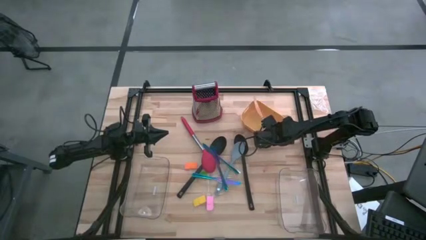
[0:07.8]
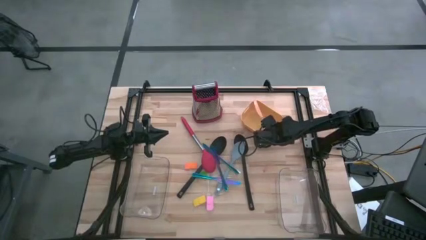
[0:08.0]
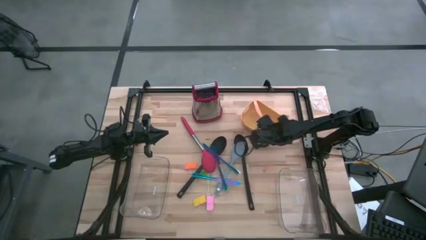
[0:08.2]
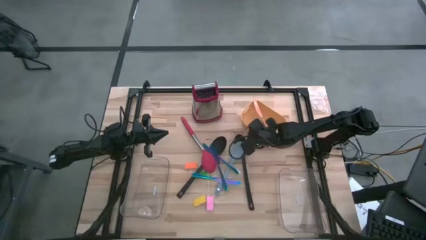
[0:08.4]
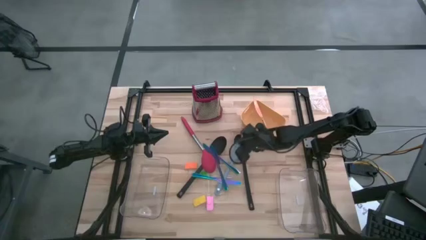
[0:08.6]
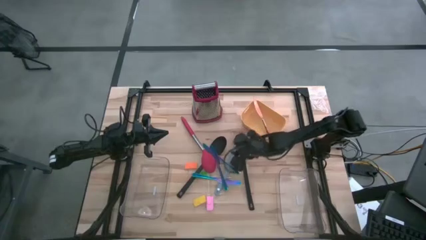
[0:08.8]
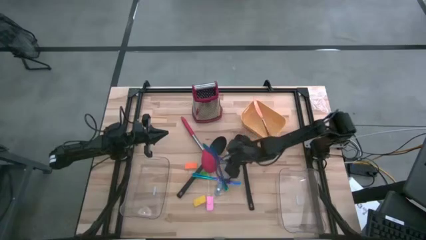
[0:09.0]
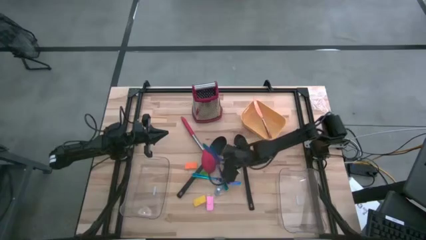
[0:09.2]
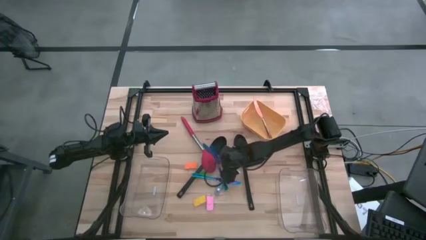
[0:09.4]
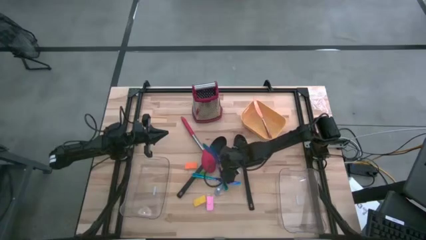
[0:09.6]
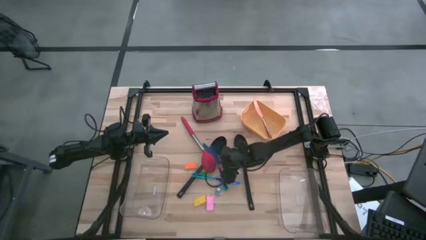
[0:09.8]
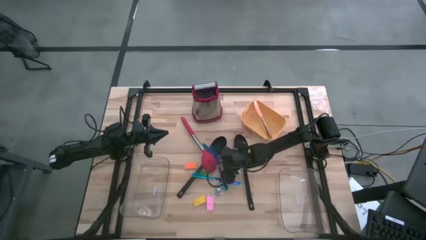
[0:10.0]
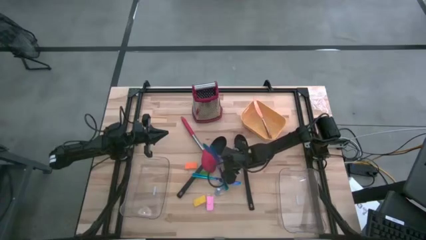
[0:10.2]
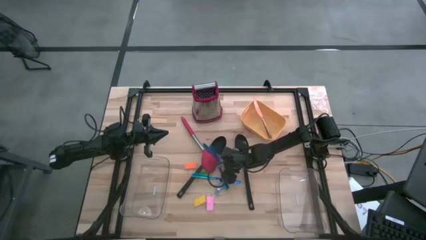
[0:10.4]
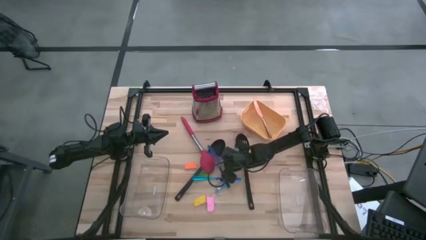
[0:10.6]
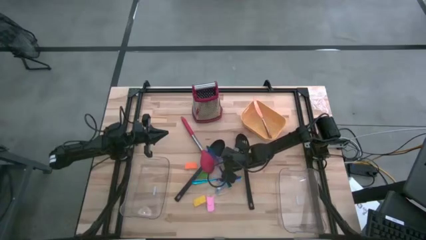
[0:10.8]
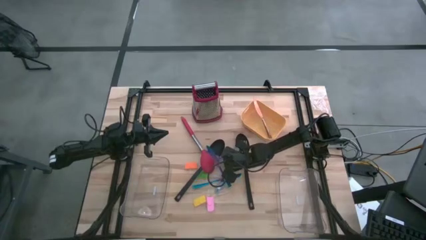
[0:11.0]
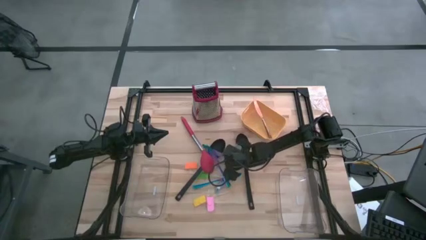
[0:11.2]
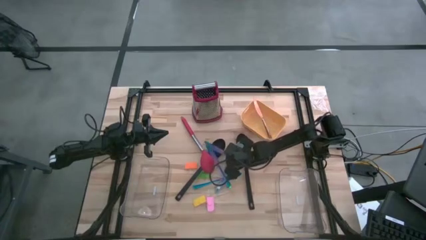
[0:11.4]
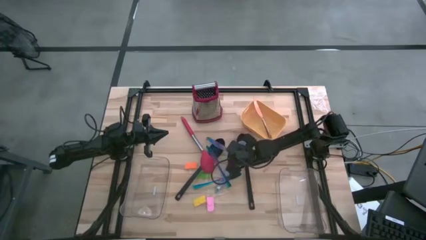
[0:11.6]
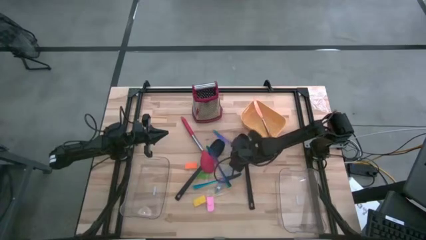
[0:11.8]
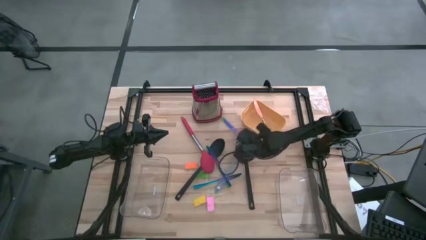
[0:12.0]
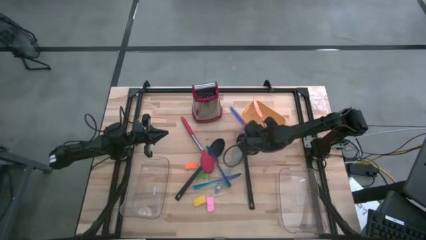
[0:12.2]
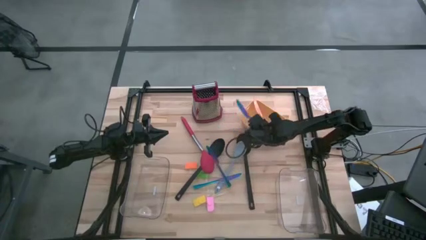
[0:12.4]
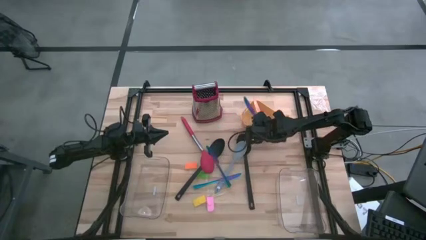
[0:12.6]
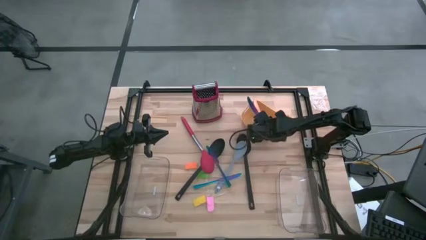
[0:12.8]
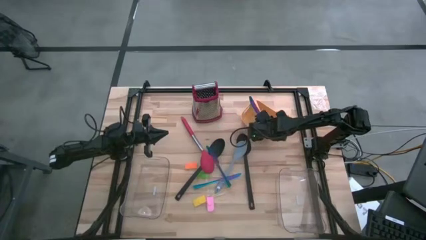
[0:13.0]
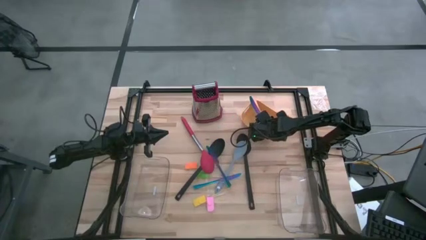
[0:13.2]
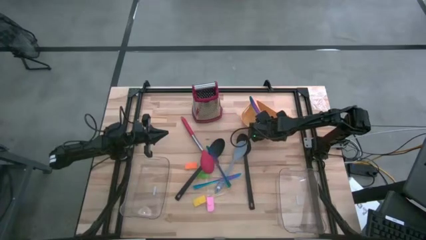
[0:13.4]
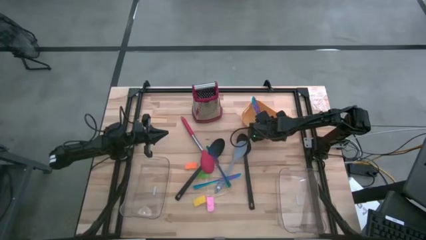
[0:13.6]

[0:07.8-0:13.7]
Task: Pick & Place Kitchen Items
Put the top right purple knife into the yellow bin

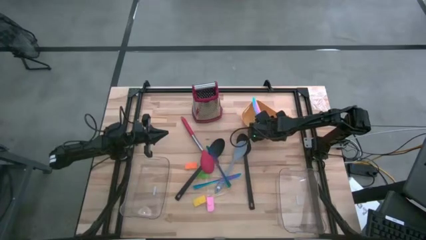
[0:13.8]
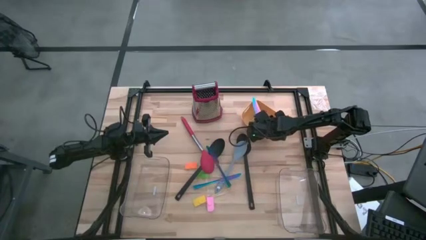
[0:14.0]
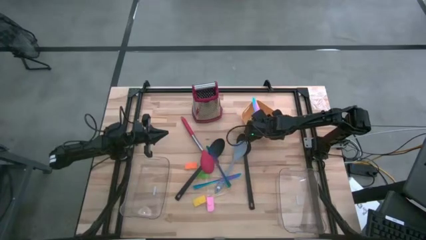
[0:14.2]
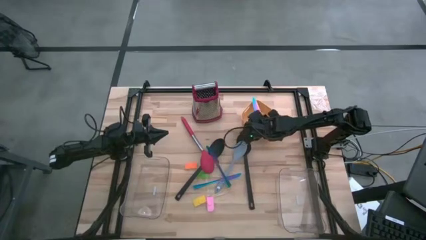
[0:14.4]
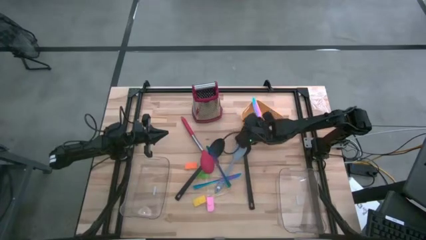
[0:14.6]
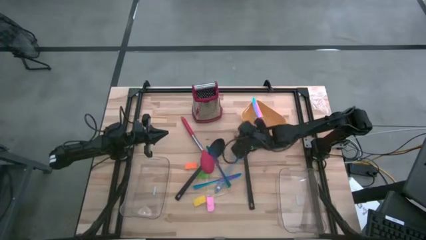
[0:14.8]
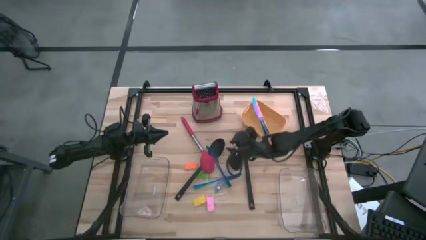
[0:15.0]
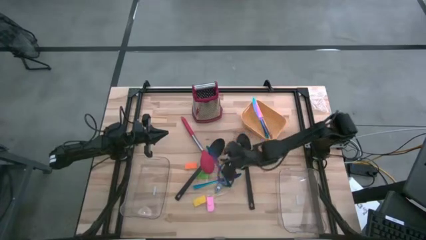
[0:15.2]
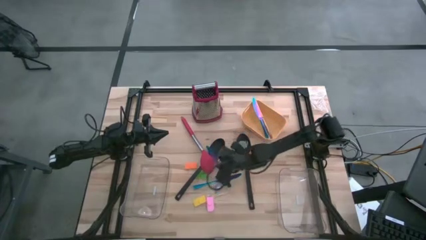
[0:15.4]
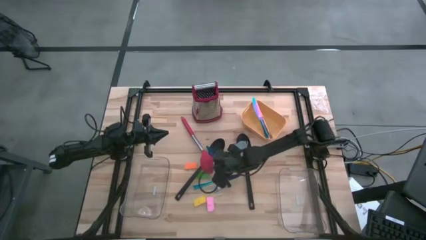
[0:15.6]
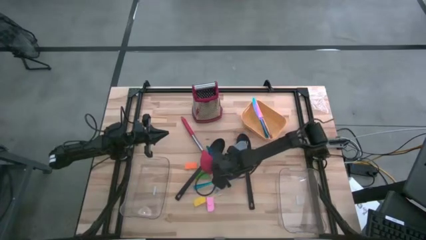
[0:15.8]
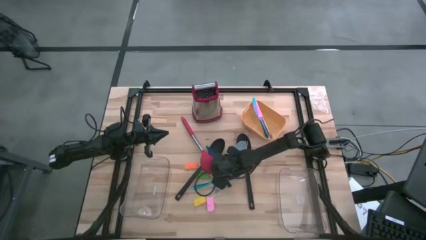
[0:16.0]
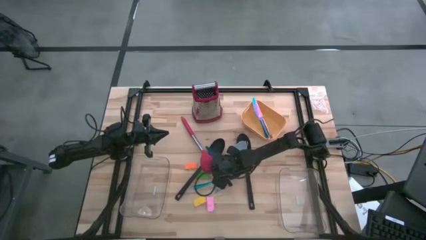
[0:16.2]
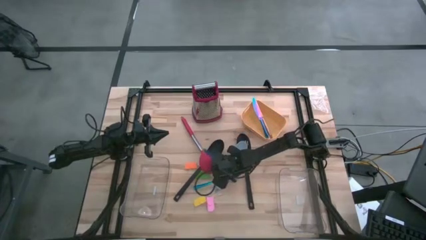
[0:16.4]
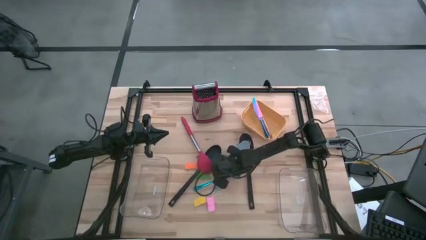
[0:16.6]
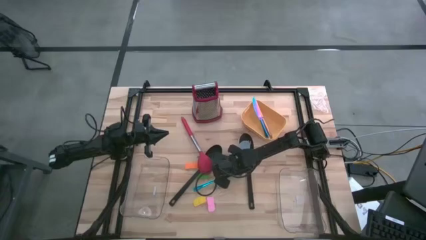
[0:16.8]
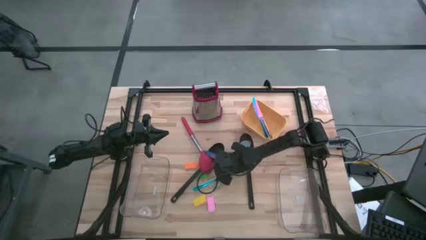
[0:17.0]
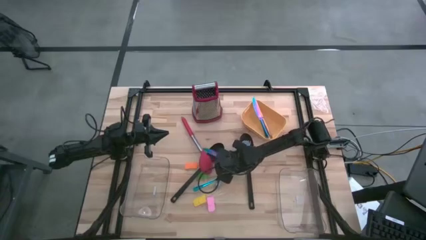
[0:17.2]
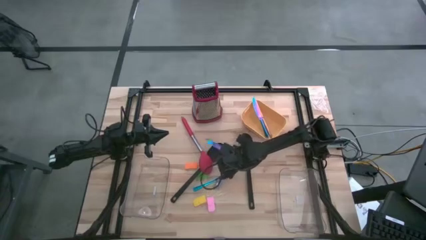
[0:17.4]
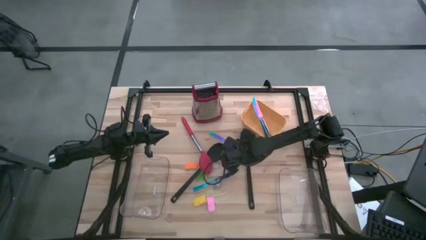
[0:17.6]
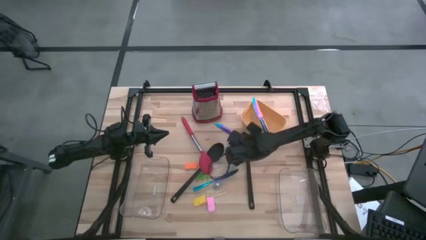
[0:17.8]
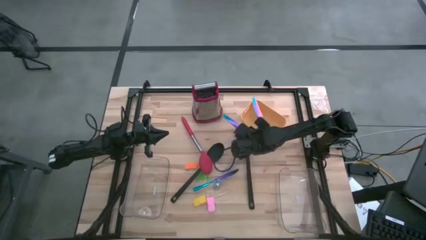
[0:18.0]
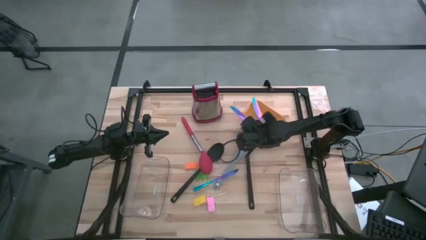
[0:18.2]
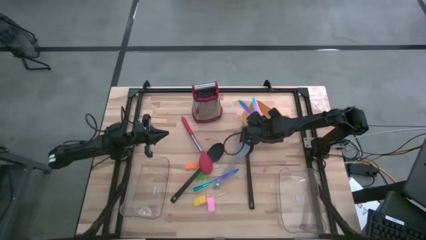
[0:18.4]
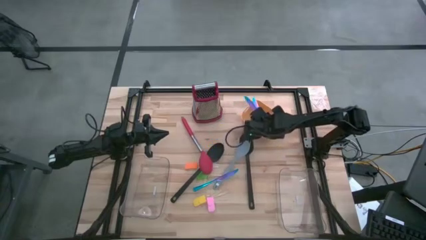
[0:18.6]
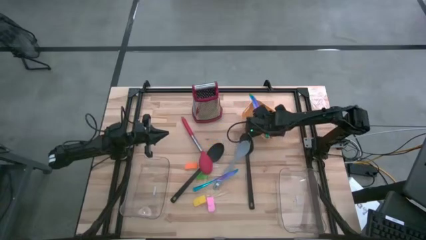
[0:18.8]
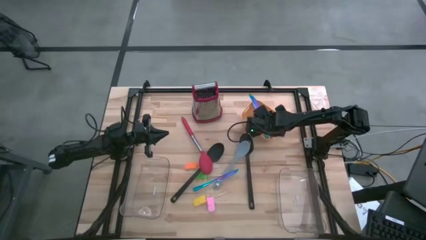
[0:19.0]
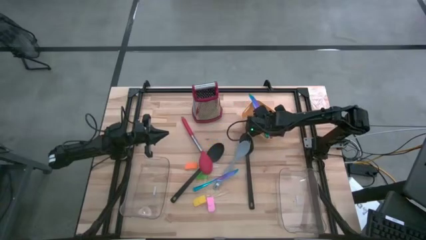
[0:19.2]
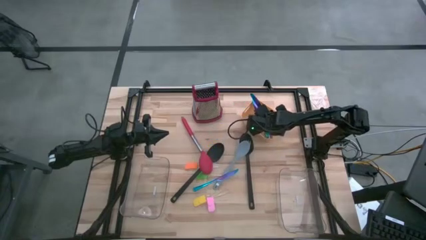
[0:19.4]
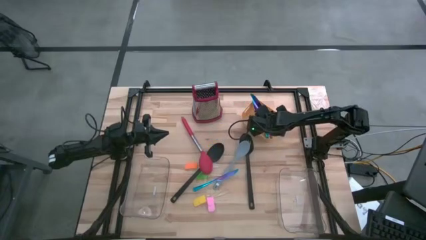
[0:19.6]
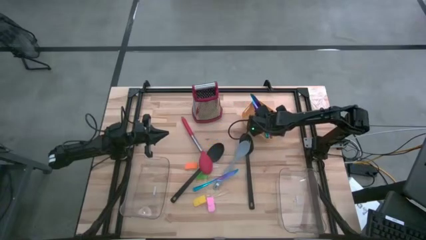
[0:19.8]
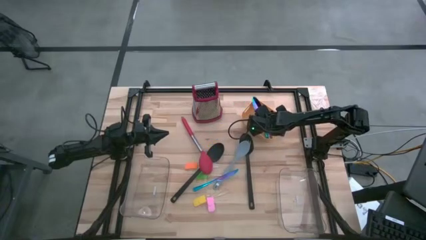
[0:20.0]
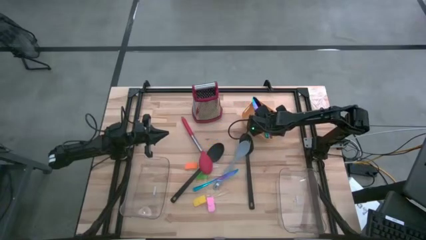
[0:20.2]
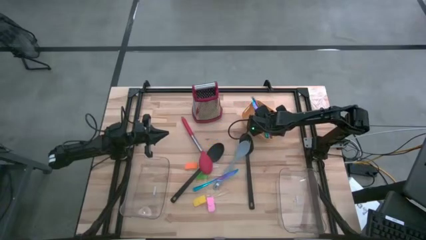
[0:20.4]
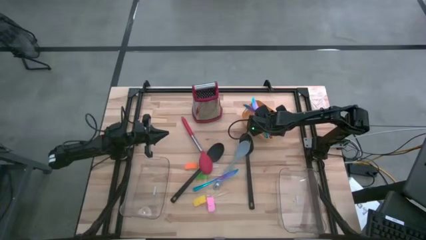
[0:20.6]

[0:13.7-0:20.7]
Put the top purple kitchen knife into the yellow bin

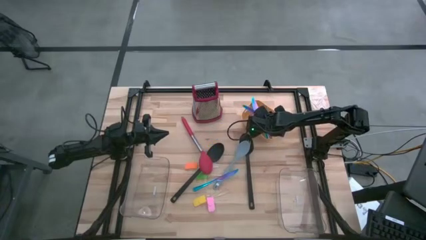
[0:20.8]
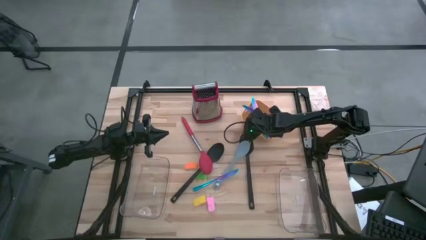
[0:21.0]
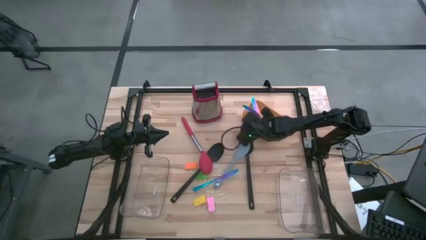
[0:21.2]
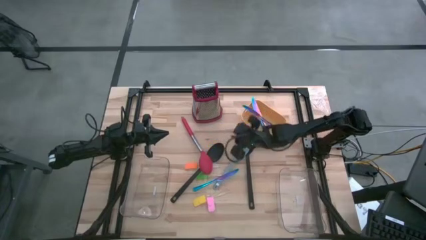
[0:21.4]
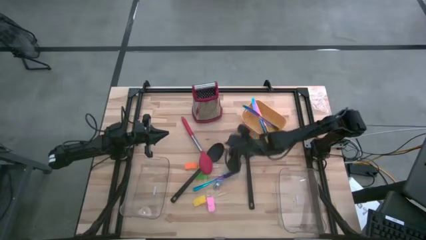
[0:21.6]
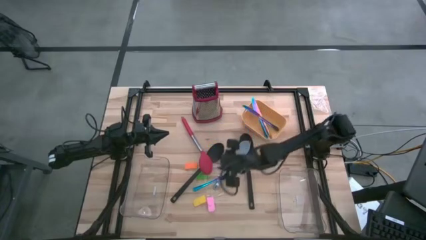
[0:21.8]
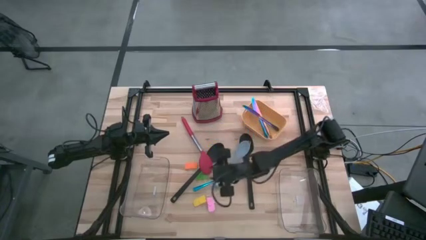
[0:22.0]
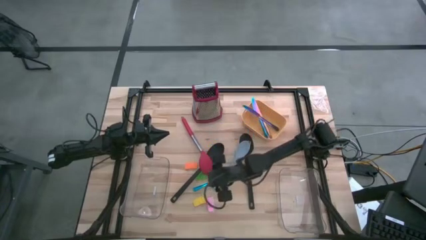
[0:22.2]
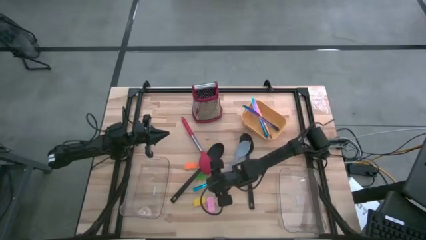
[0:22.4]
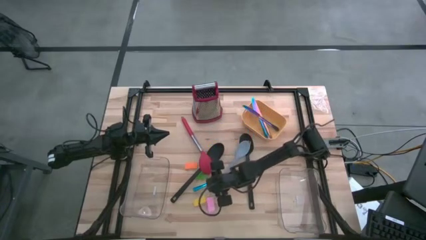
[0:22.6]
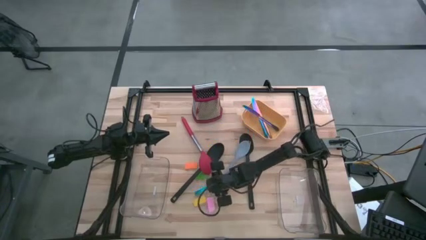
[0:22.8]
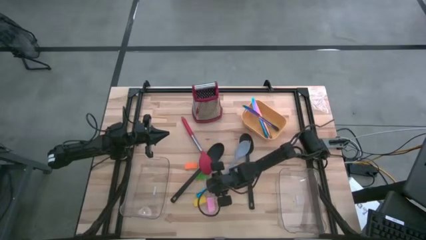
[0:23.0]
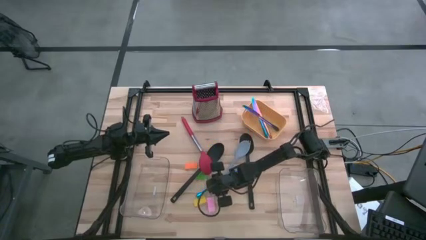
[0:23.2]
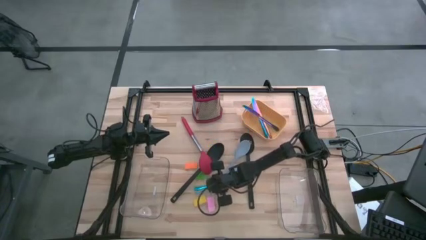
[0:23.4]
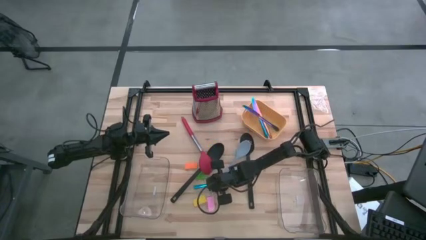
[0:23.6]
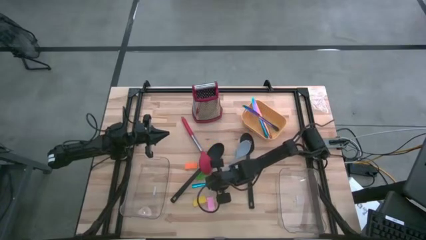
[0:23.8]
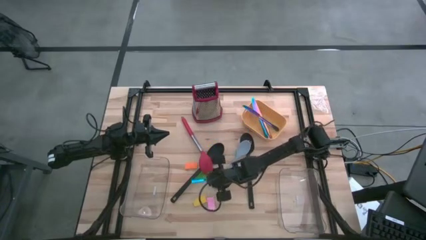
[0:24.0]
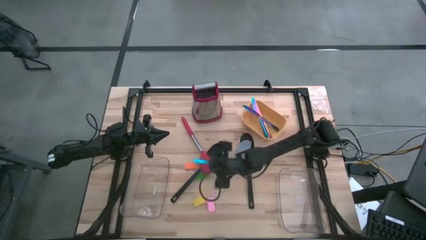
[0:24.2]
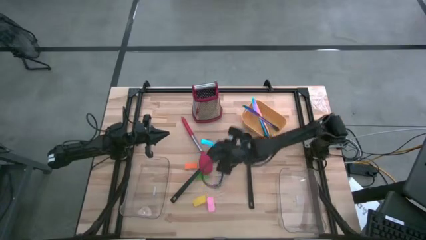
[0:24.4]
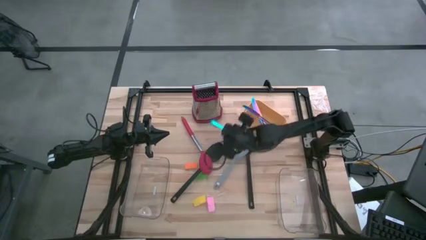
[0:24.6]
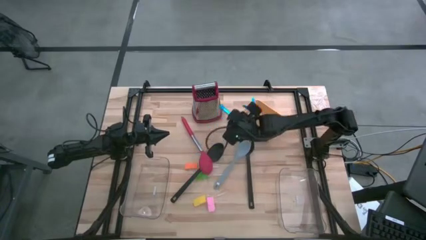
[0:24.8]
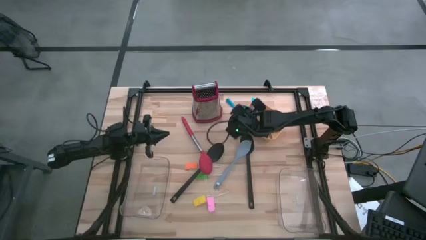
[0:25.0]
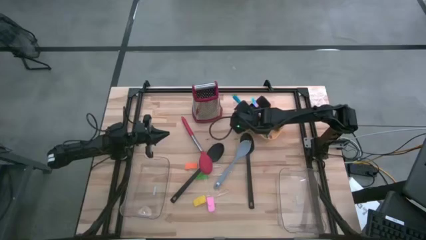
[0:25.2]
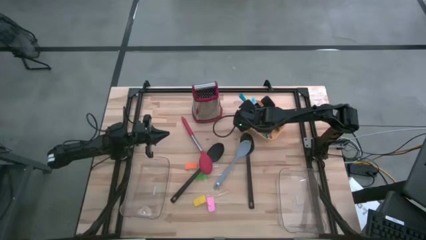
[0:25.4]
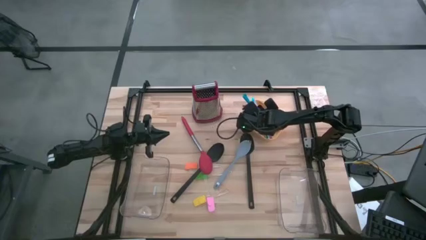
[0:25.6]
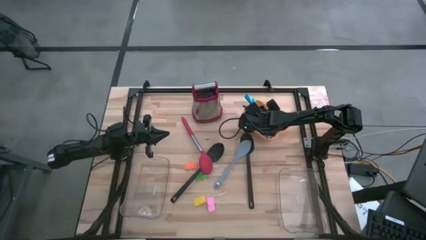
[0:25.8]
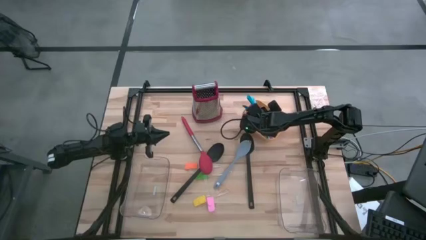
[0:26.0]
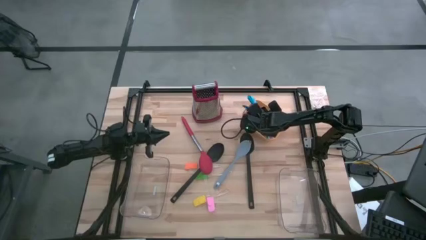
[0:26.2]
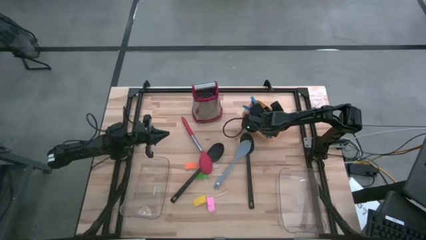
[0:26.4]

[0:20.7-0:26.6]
Put the purple kitchen knife into the yellow bin
